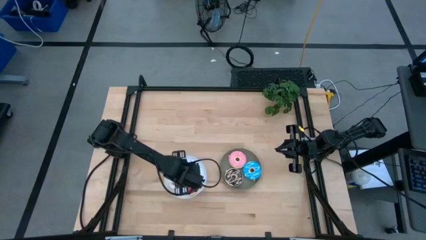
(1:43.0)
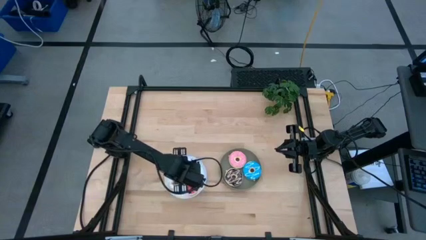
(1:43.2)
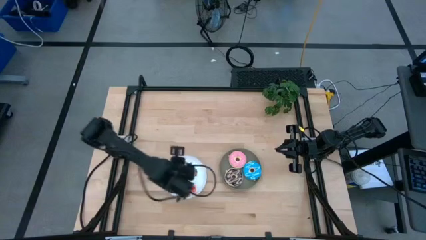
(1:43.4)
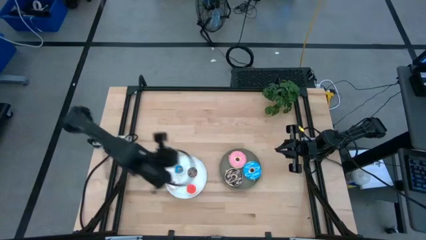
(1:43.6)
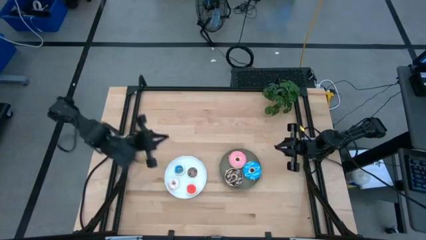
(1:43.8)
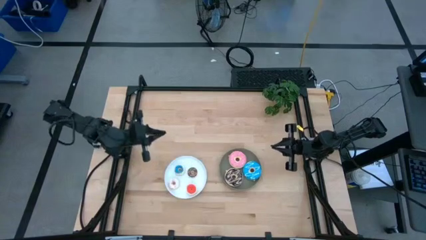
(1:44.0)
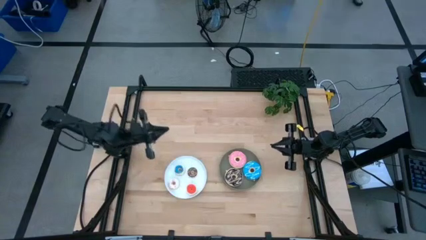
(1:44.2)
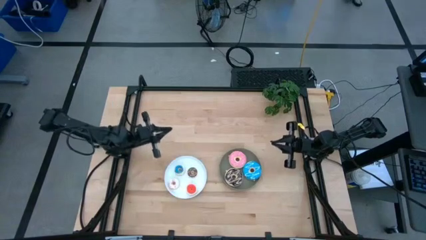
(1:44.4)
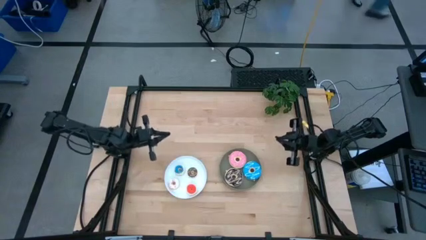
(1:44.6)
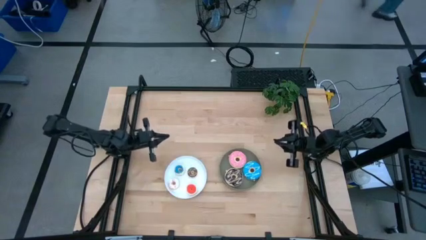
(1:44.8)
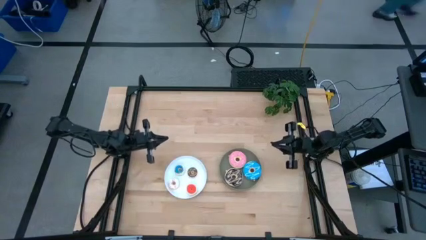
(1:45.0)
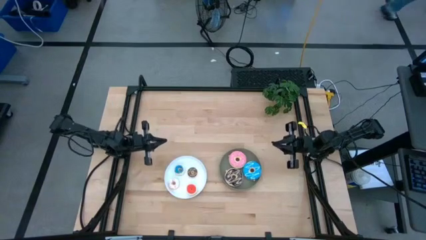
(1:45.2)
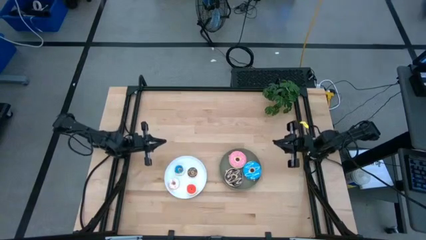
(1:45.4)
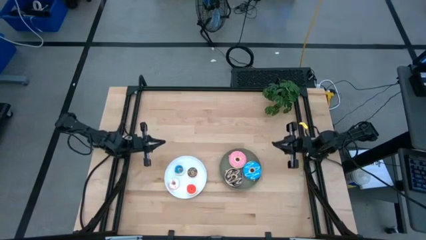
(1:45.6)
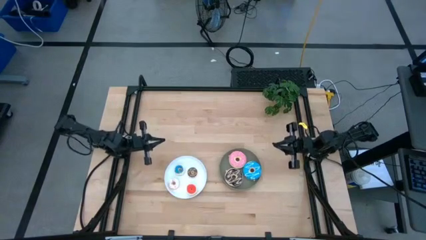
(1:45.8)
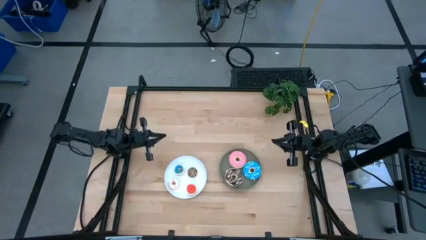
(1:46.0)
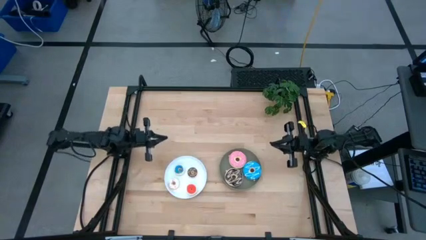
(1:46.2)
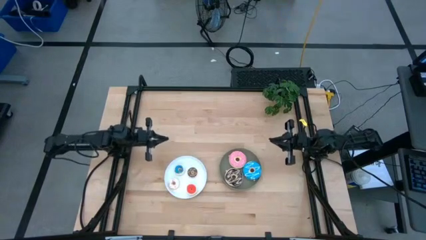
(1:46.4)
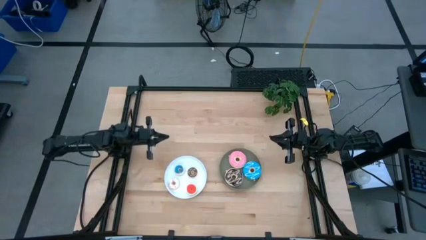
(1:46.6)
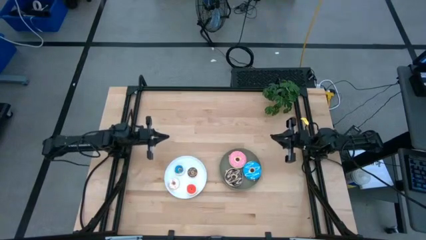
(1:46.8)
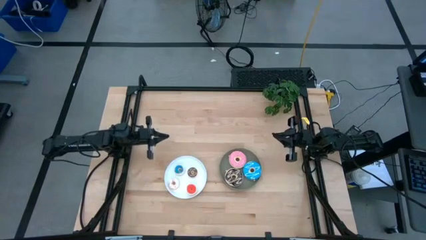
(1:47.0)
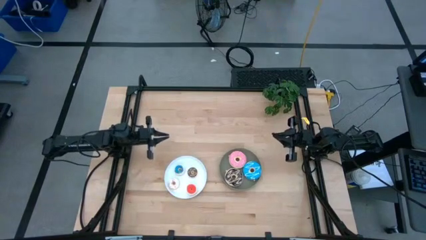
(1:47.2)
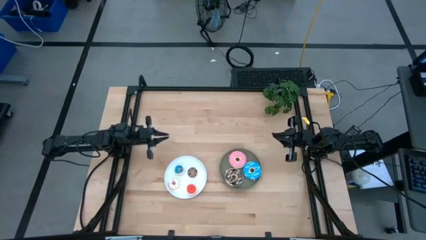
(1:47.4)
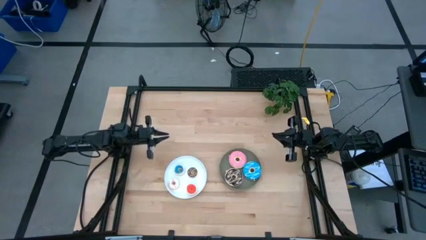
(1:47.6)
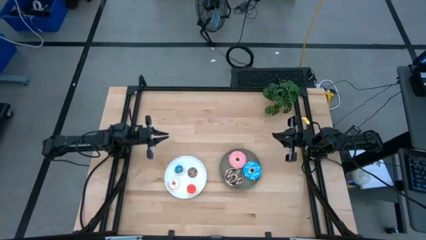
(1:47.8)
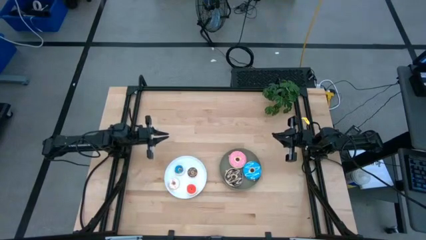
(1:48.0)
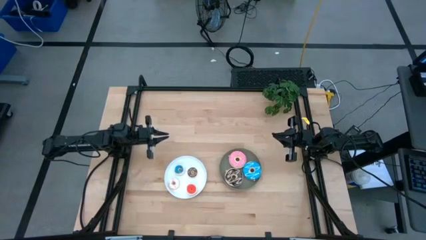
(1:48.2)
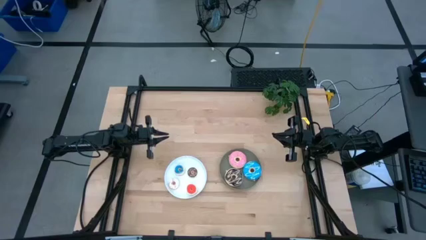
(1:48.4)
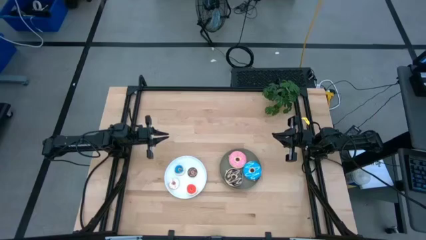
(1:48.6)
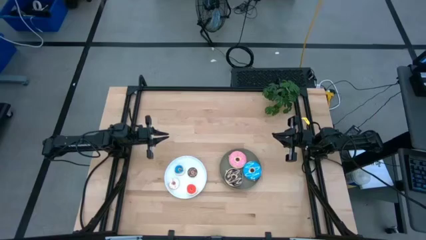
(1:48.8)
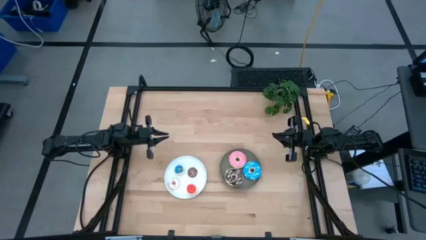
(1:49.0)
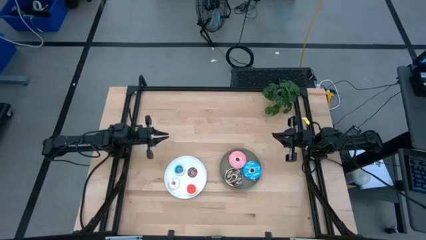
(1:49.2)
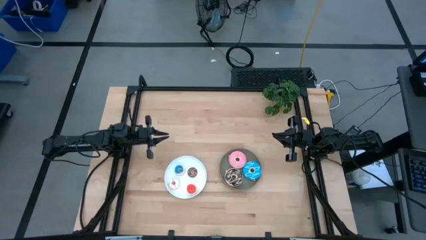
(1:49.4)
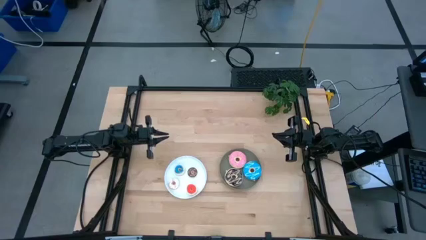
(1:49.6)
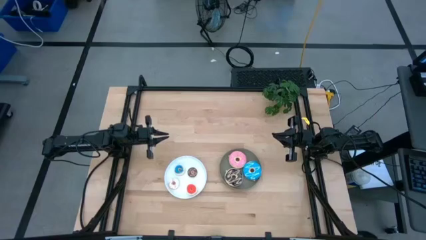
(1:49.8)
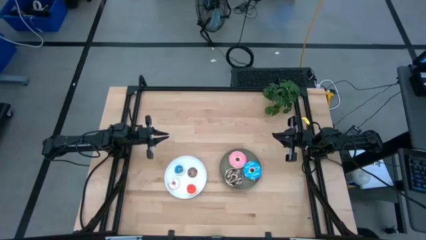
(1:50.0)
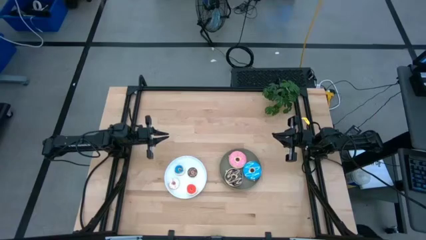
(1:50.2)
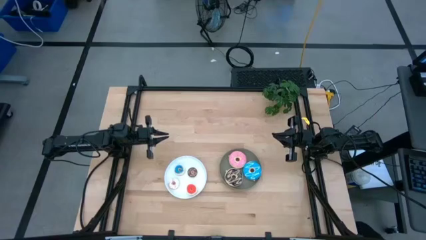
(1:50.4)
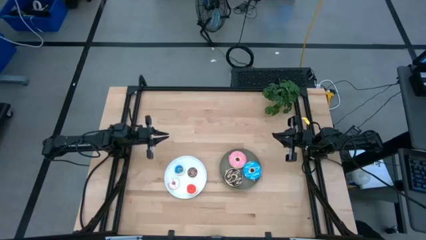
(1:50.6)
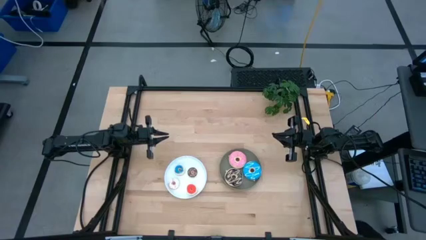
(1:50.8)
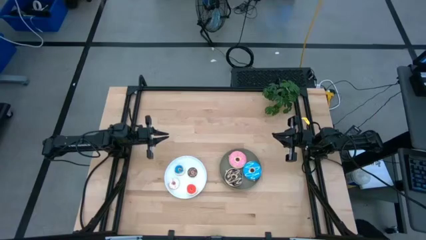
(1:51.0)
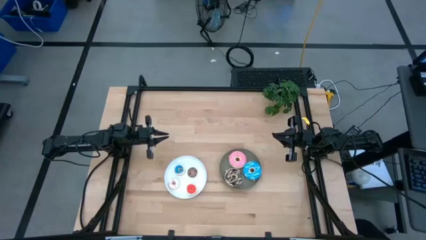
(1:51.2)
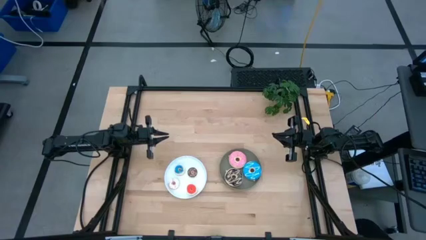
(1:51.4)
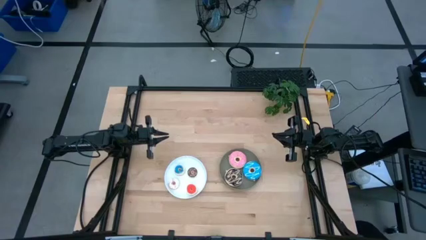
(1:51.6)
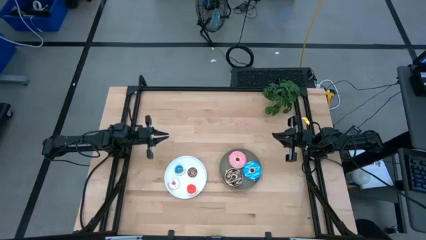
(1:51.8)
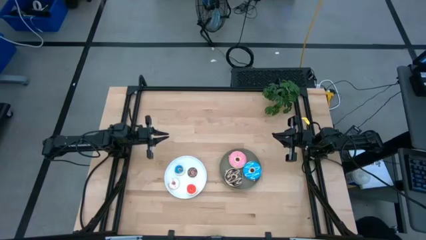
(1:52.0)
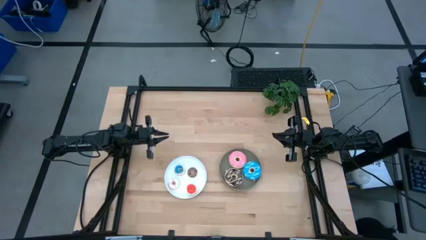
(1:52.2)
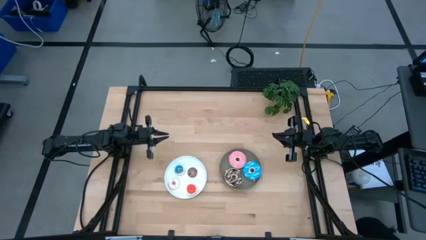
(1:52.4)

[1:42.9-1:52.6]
Task: Pick & Place donuts
Return to Home Position
